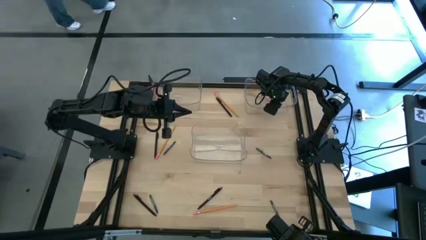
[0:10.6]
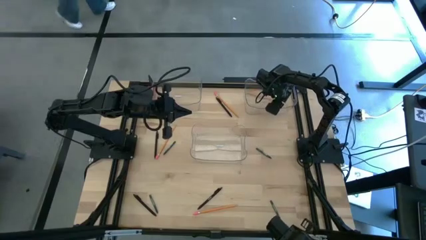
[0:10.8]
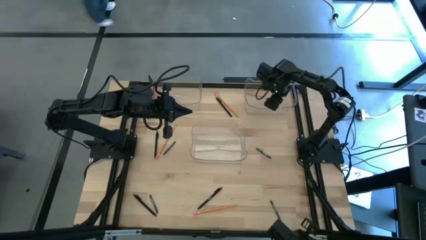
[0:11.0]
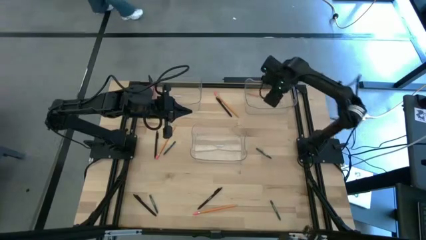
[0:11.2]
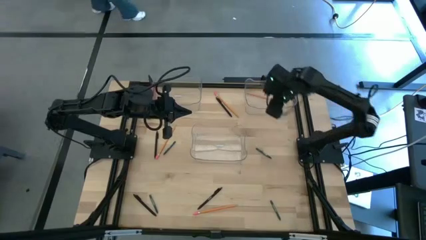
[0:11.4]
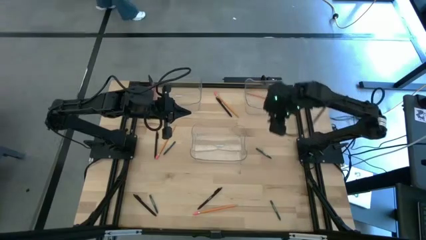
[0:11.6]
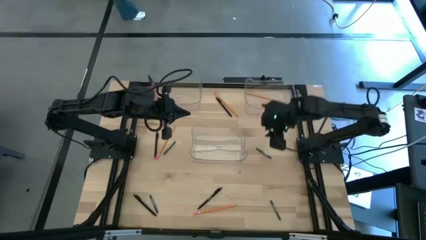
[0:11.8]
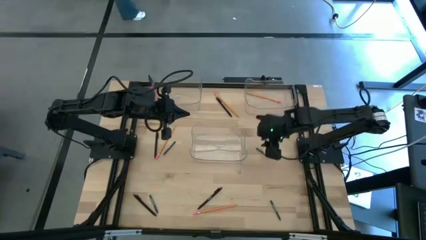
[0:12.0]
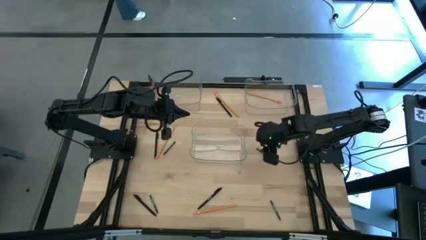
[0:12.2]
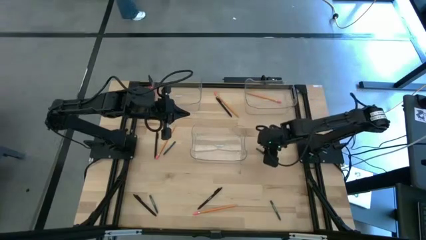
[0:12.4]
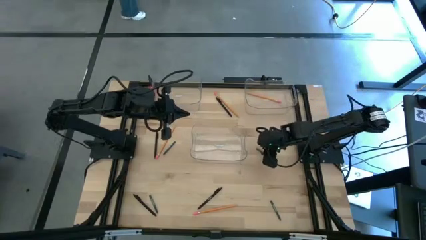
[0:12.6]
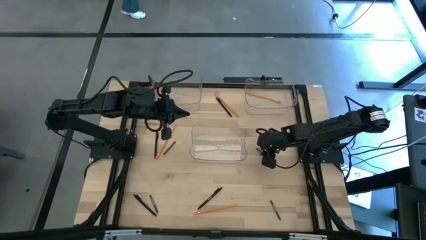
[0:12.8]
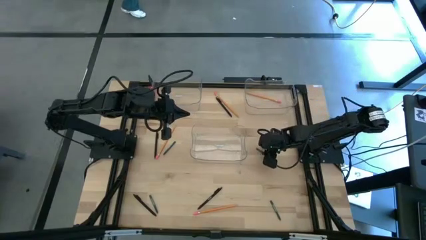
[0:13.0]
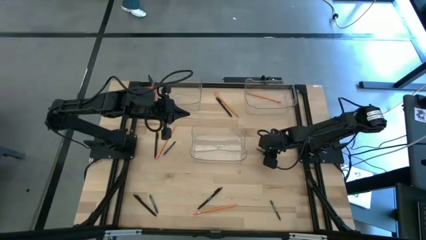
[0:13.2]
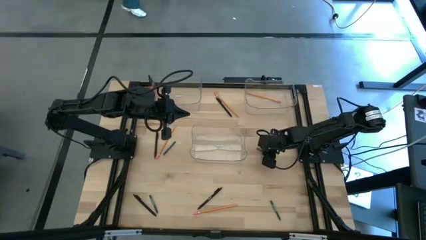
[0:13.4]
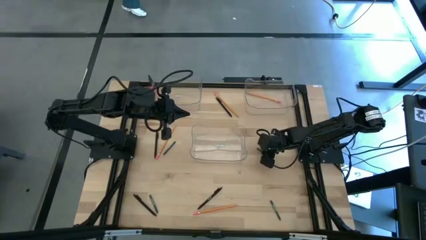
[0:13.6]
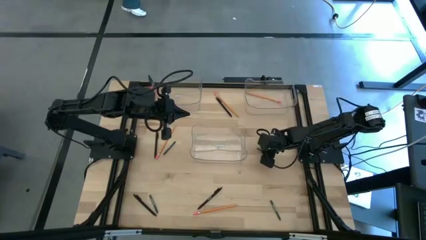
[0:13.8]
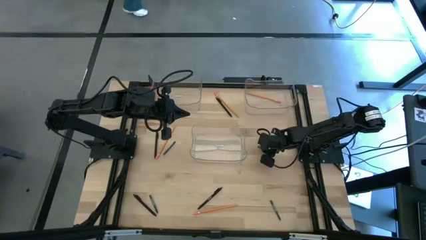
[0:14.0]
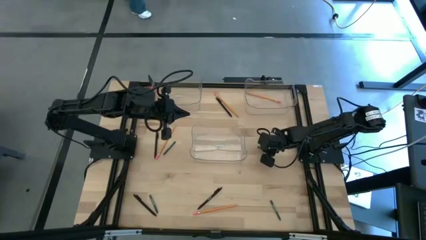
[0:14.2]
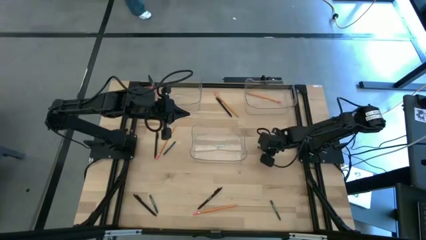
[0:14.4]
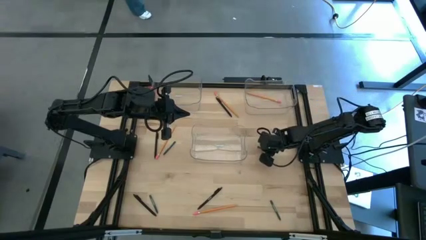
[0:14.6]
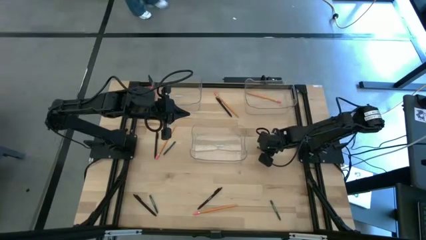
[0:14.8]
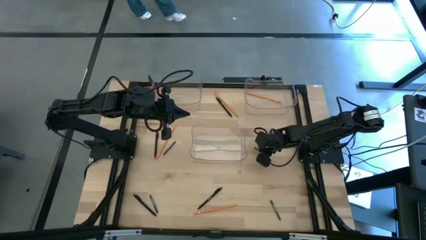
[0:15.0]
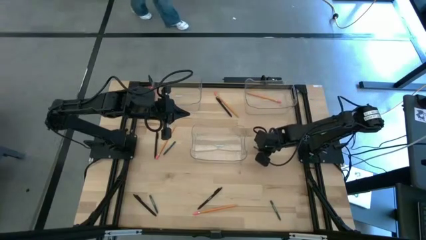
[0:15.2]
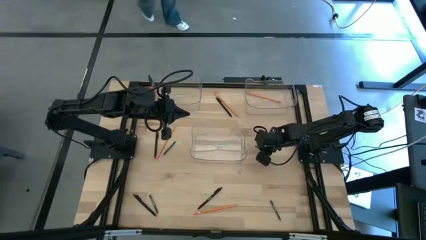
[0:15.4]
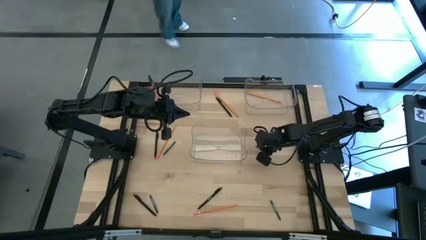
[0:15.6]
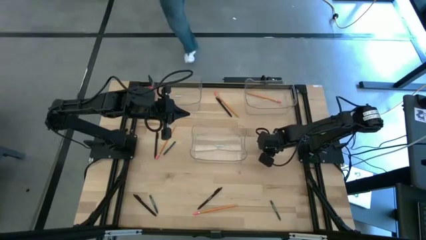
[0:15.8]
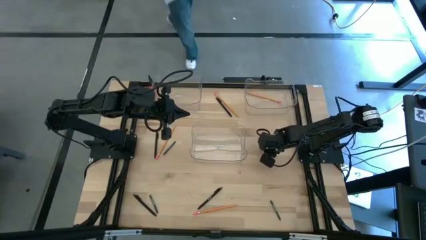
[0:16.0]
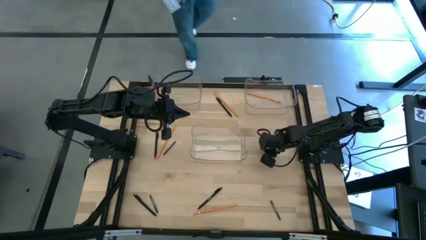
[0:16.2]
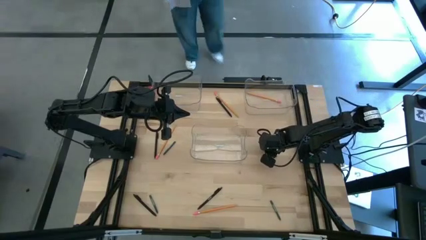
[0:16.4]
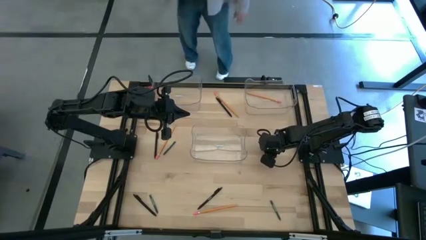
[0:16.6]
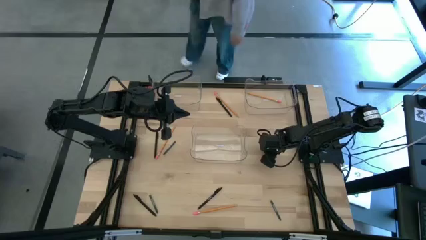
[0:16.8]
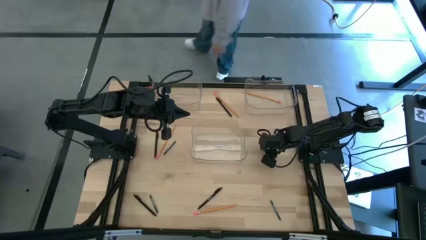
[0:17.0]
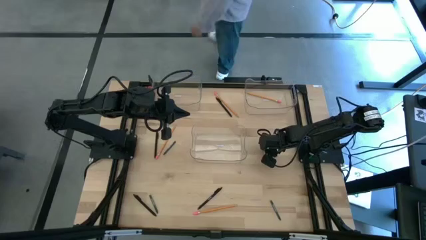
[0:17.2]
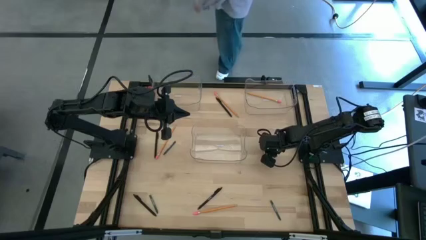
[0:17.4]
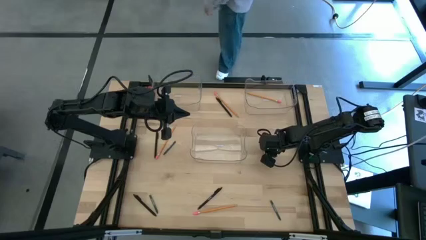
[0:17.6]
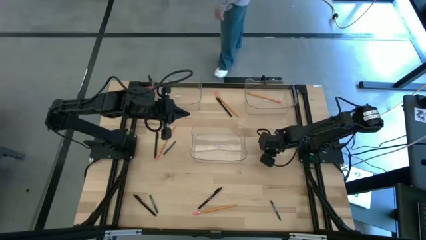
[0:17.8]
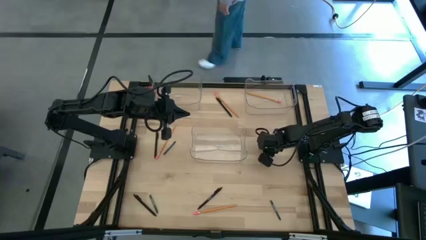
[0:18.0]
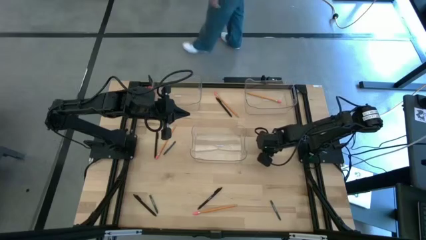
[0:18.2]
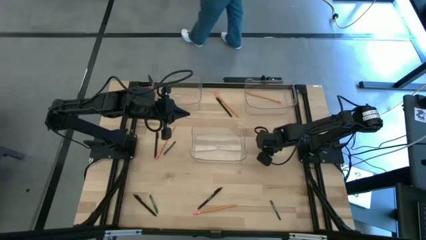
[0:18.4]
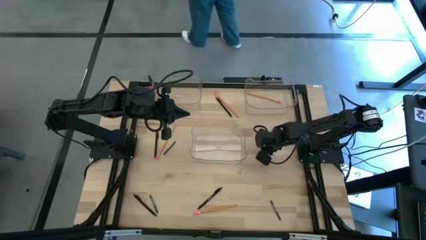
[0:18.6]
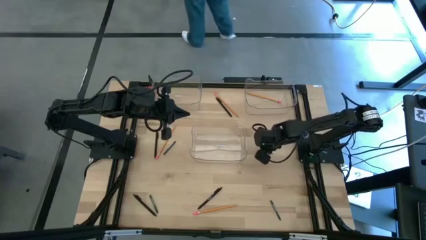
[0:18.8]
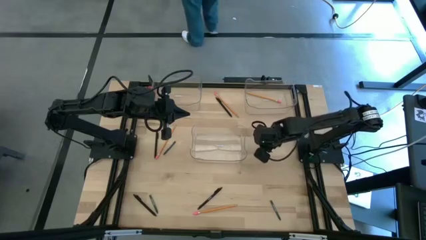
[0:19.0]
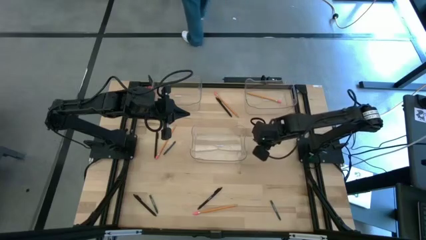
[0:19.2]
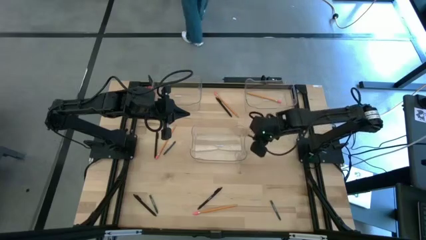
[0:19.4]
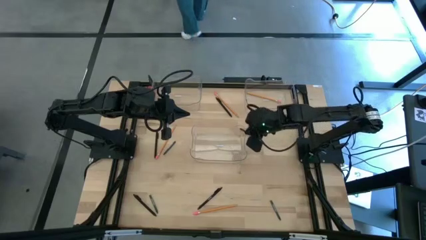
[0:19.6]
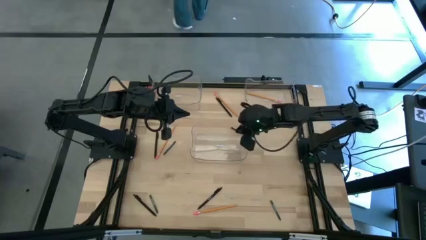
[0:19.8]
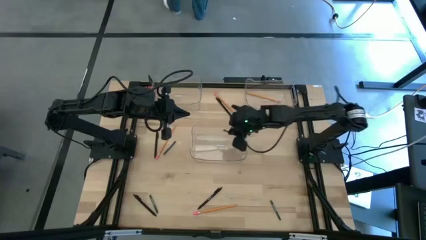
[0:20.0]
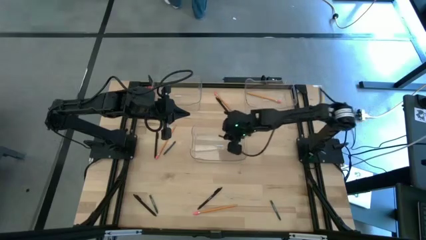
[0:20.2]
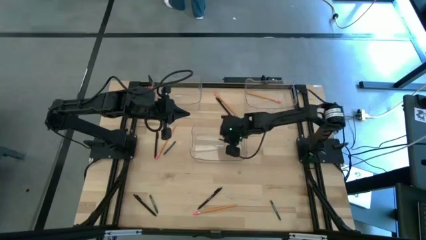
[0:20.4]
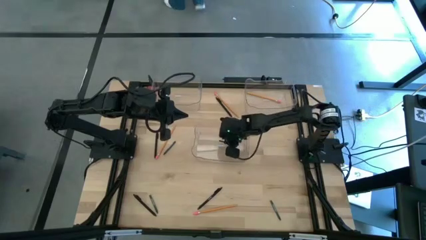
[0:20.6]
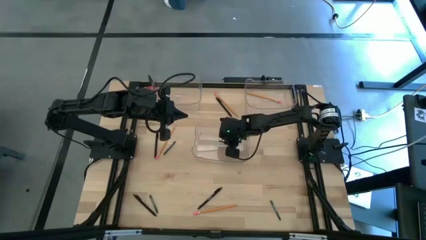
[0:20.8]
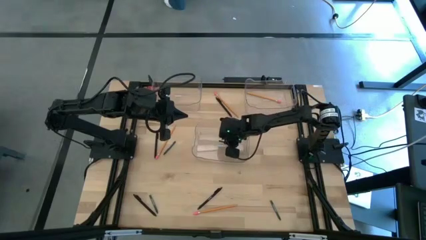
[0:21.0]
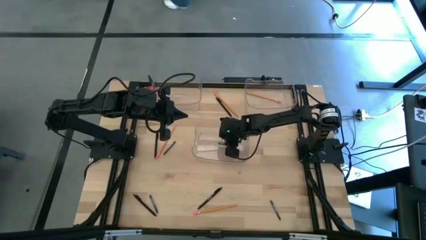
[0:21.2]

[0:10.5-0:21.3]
Task: Sort crayons/erasers/pens/pencils in bins
Put the green crayon into the middle transparent bin

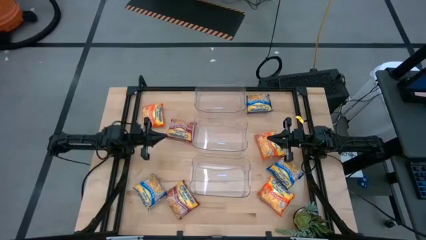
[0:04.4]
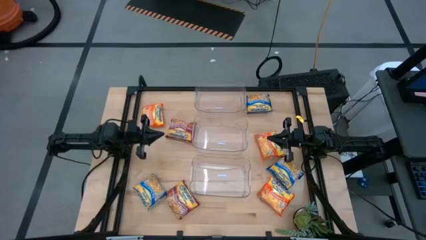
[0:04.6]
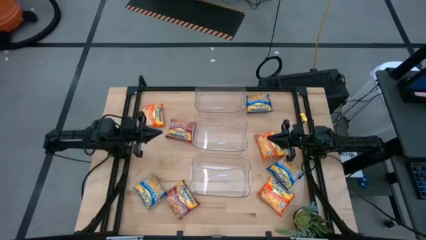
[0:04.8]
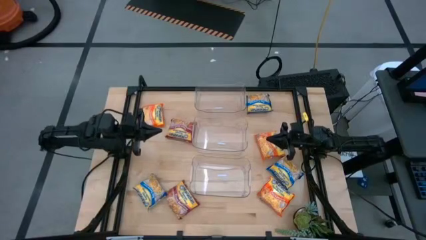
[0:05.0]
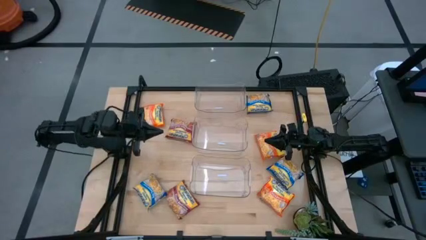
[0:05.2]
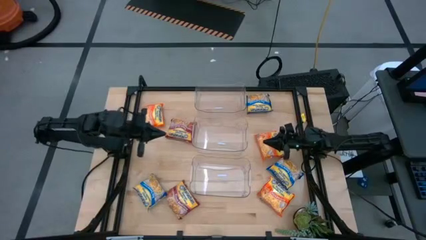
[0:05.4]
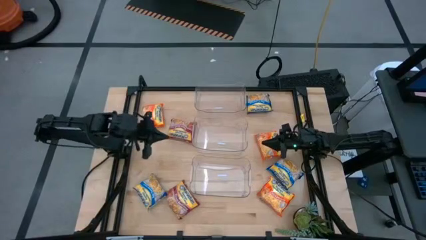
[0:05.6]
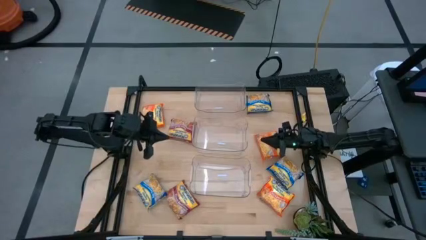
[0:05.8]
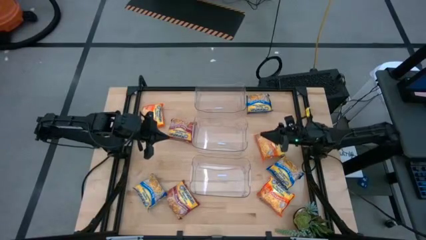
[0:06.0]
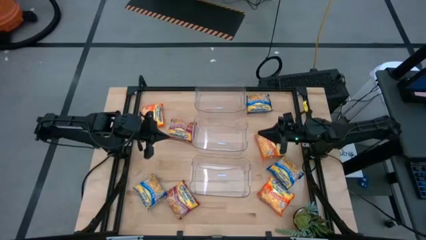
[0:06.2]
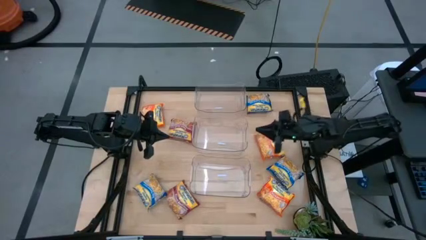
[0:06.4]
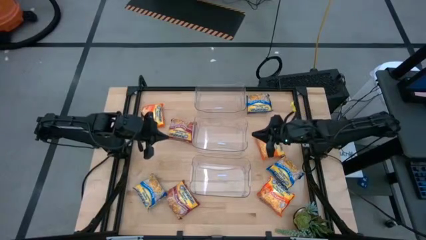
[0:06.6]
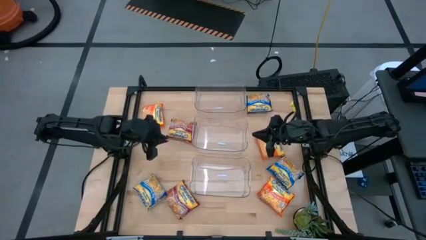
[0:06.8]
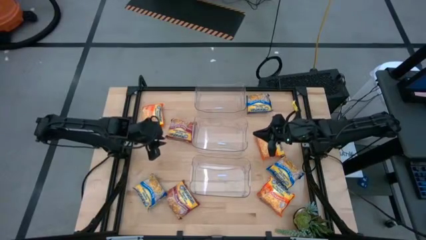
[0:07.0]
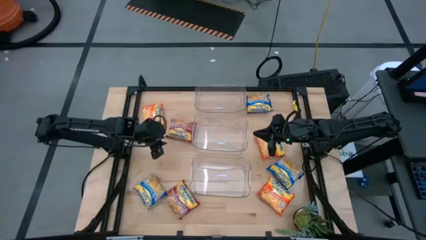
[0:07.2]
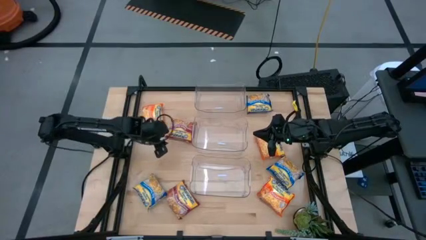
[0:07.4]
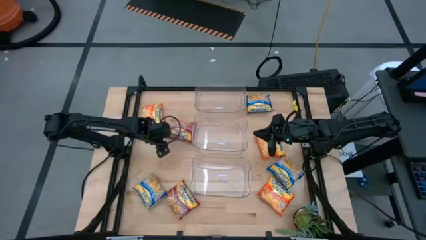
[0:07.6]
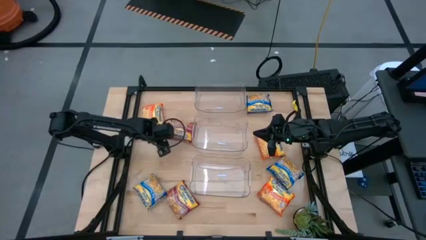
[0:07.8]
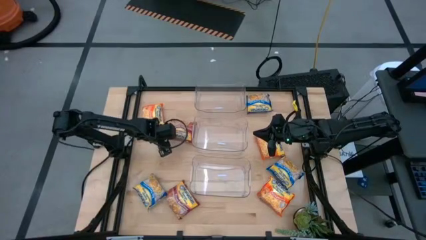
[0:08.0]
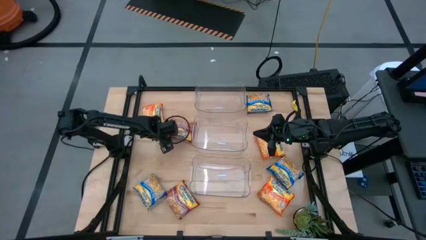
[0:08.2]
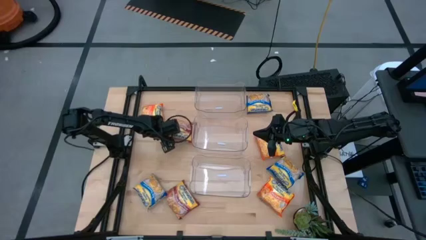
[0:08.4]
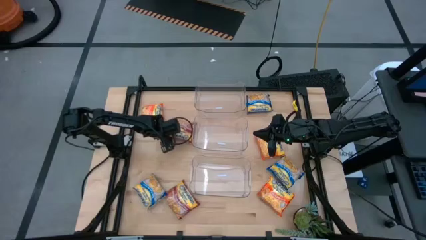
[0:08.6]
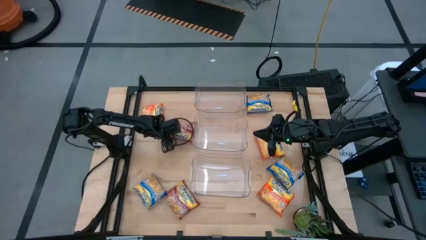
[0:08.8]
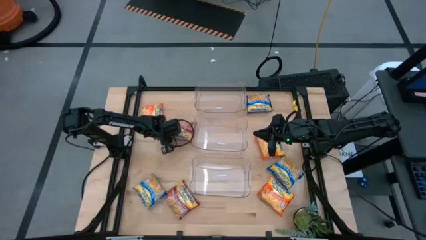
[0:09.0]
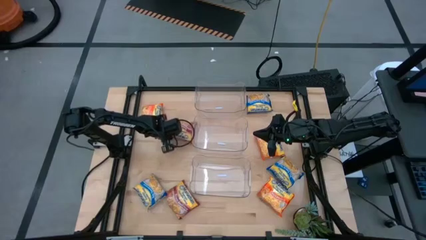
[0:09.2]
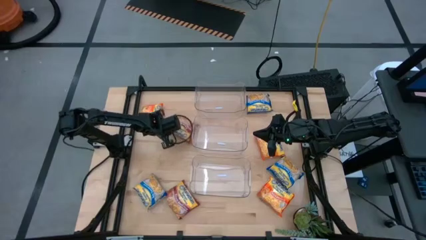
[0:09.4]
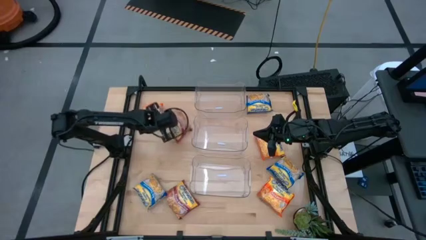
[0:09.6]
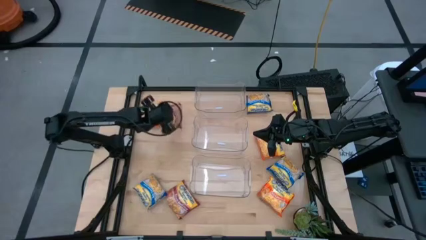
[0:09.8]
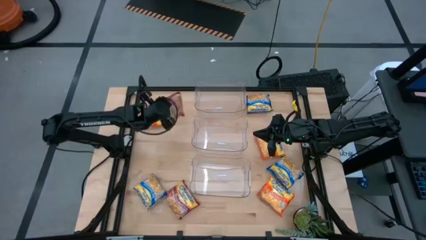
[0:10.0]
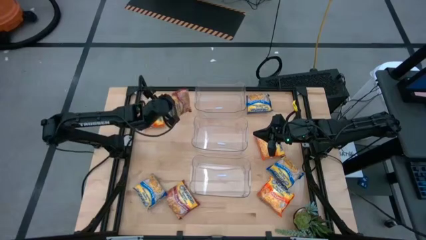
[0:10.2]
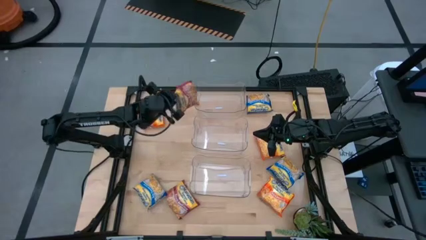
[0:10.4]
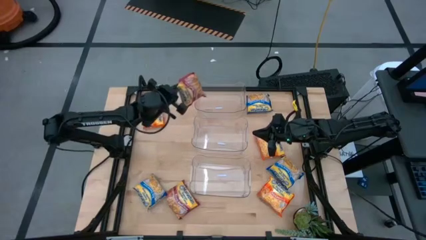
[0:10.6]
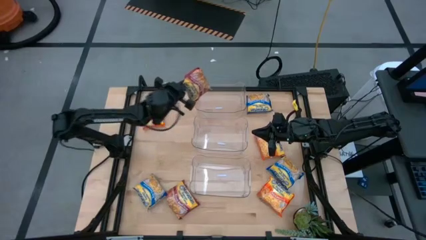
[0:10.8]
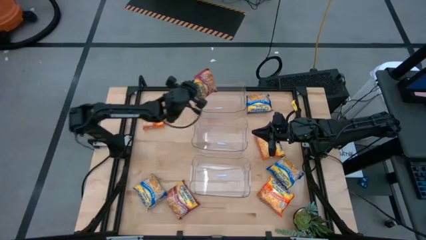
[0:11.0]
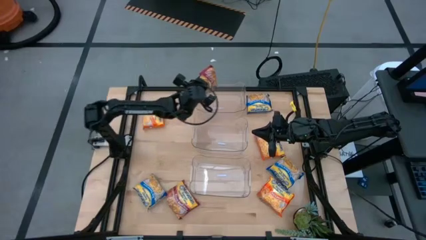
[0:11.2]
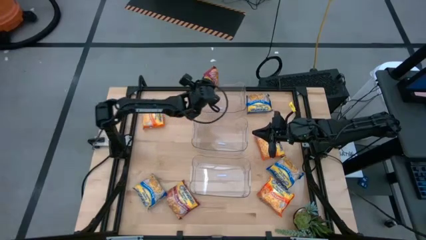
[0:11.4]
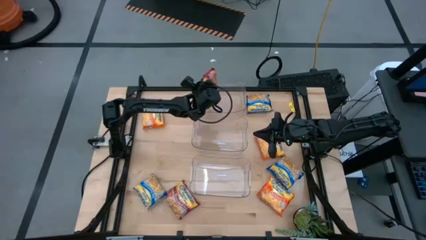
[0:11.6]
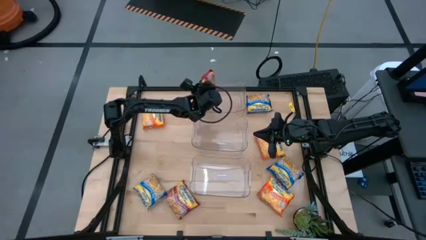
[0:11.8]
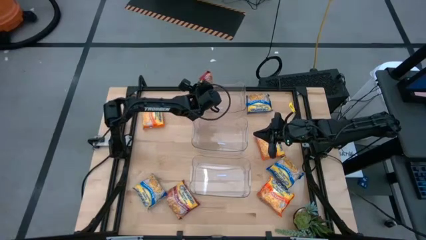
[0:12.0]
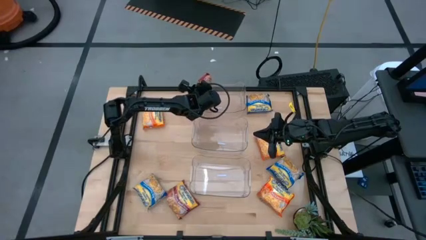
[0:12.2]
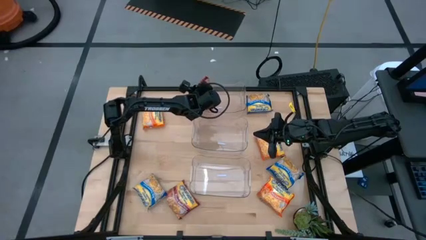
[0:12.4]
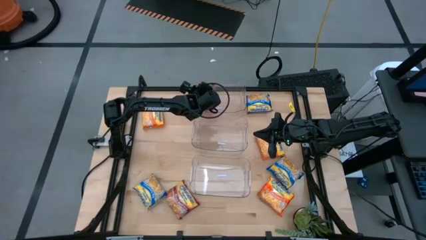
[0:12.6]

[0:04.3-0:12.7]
Task: Sort Maruchan noodles
Put the top red noodle pack into the top transparent bin
